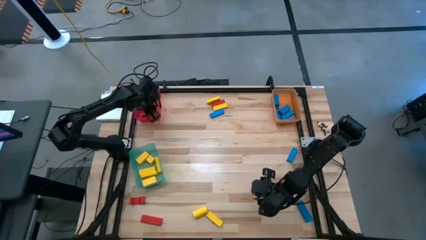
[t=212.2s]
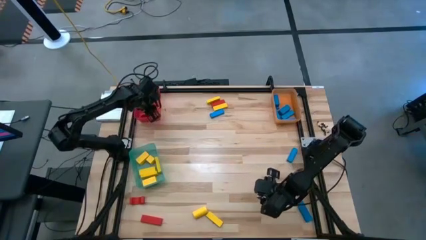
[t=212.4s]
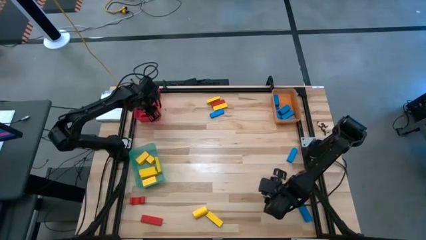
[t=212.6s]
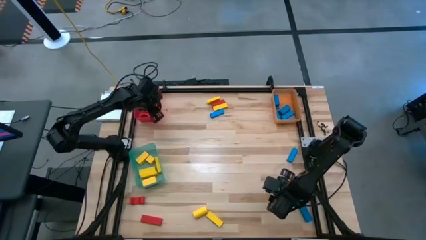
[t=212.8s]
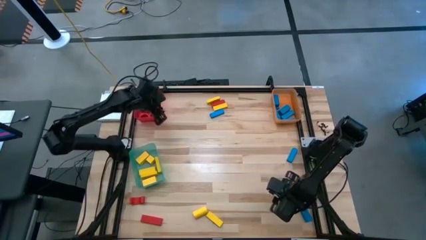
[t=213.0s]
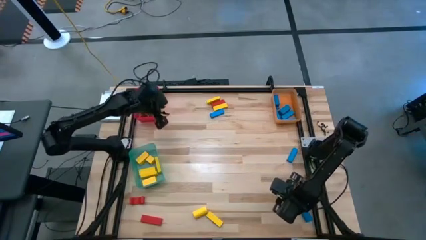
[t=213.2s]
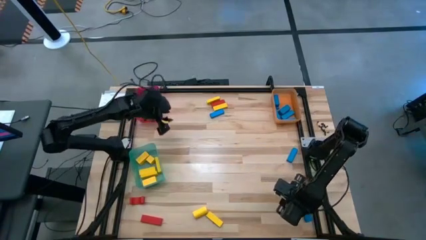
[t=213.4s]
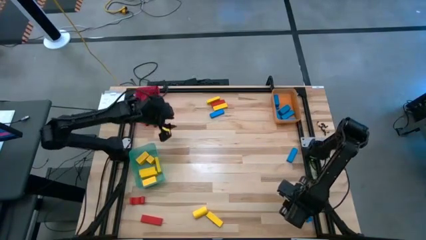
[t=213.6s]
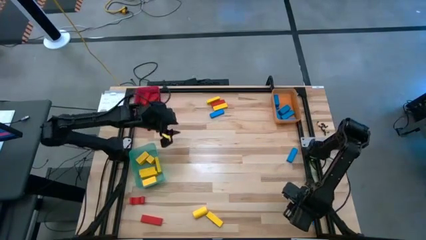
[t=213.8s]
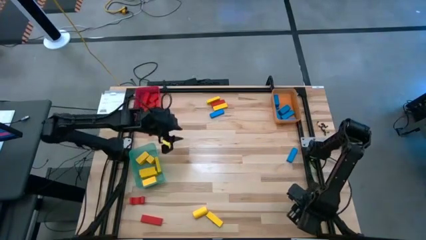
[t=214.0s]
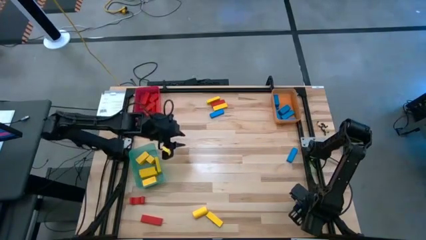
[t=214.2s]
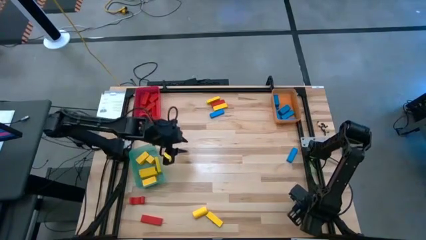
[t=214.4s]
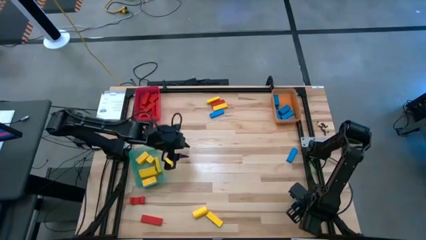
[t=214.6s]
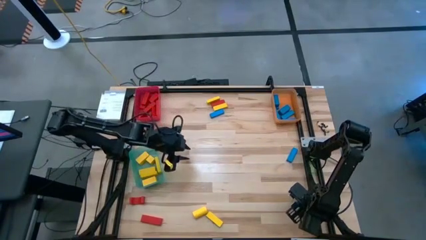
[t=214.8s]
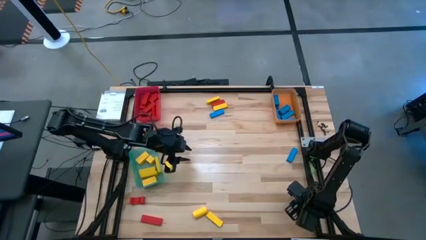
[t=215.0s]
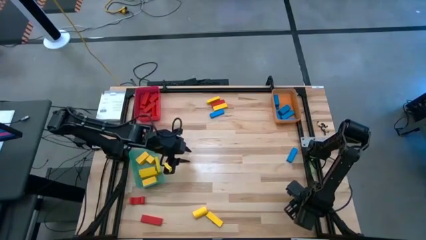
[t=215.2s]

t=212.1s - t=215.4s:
Task: Sort blocks
Put the blue block into the orange bin

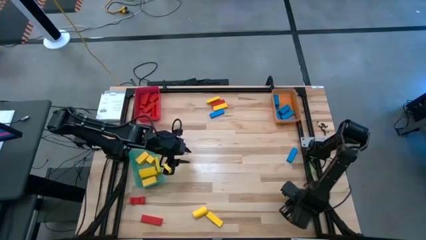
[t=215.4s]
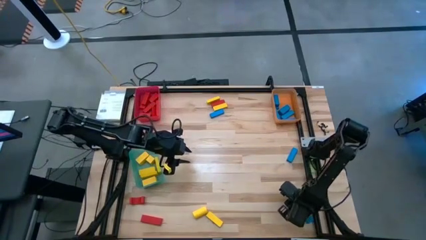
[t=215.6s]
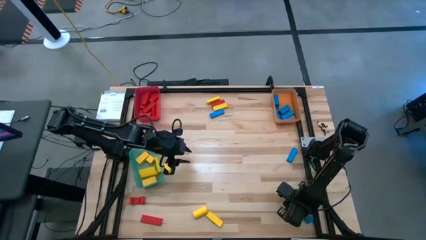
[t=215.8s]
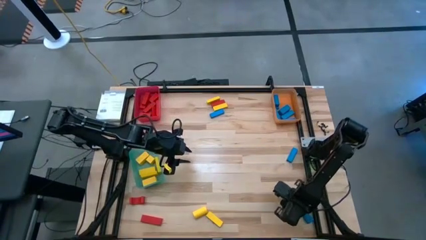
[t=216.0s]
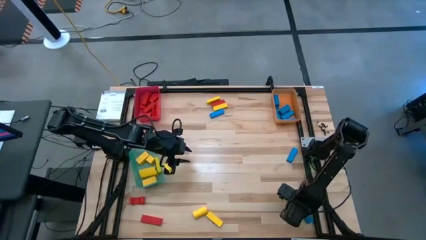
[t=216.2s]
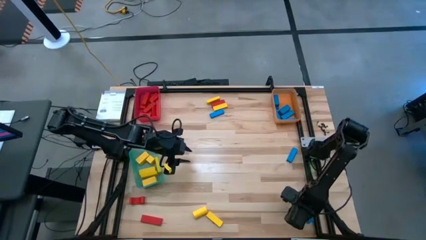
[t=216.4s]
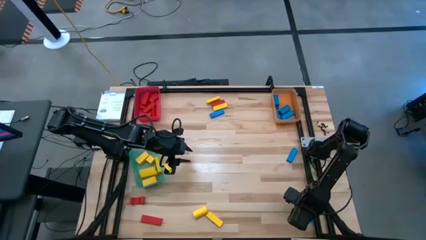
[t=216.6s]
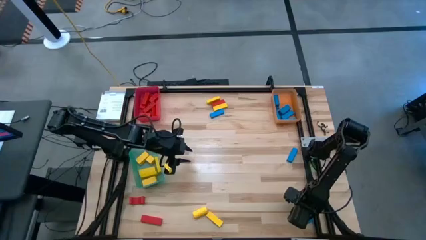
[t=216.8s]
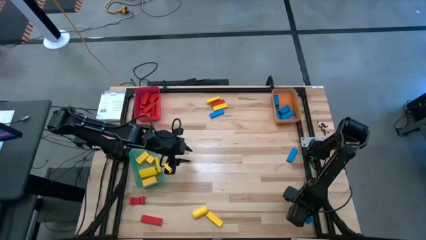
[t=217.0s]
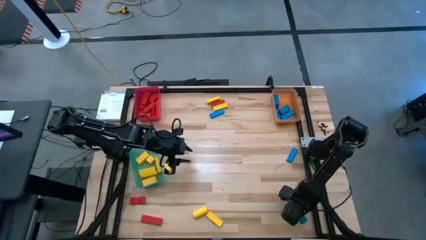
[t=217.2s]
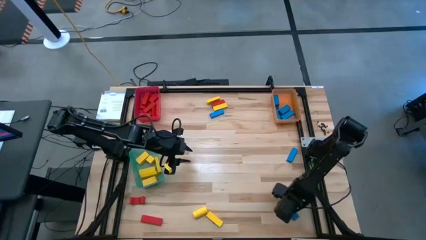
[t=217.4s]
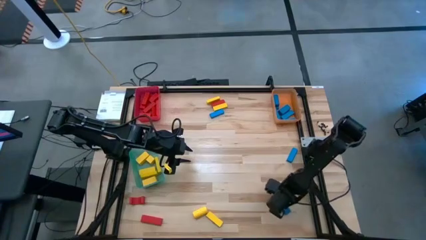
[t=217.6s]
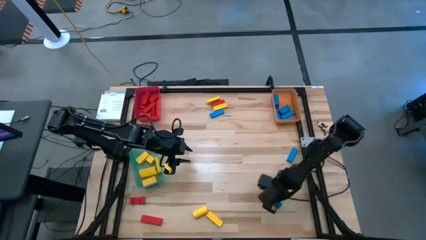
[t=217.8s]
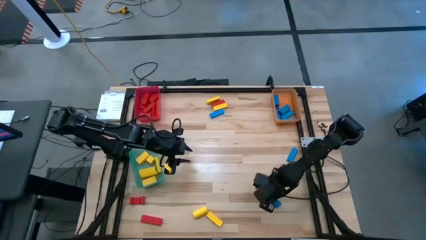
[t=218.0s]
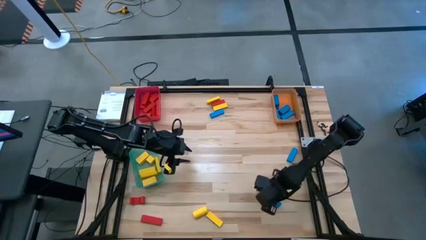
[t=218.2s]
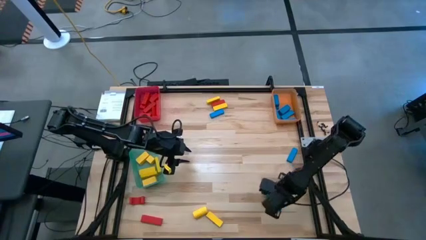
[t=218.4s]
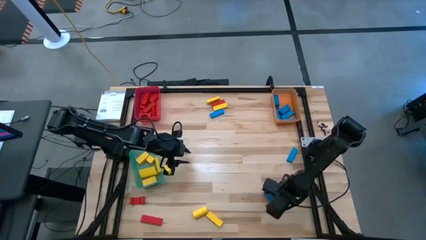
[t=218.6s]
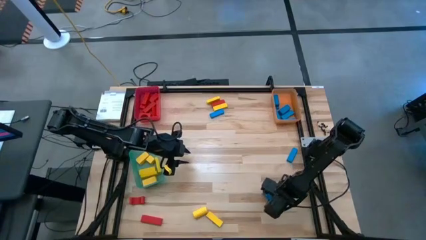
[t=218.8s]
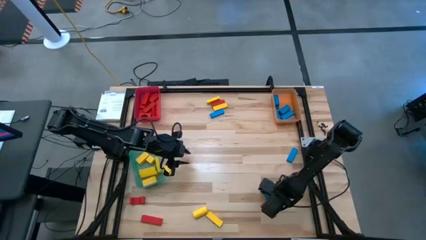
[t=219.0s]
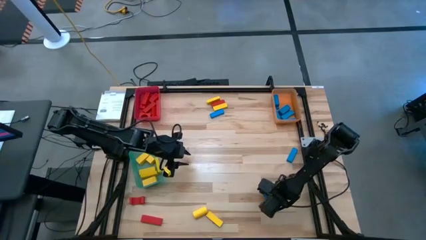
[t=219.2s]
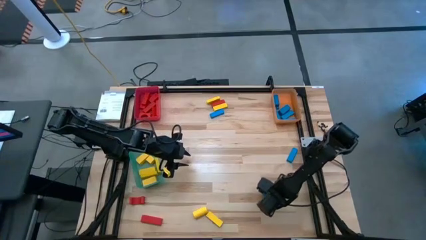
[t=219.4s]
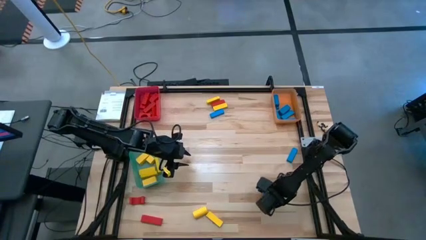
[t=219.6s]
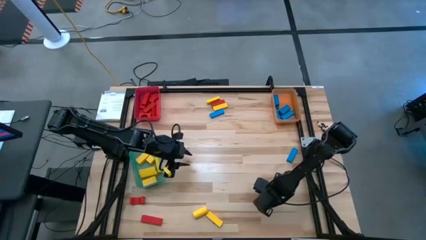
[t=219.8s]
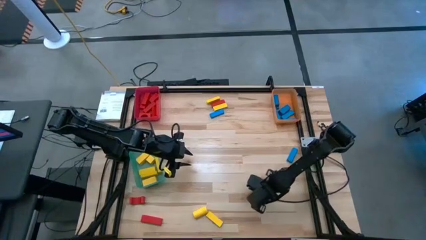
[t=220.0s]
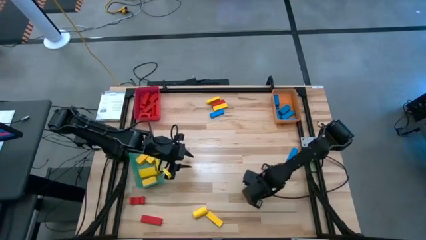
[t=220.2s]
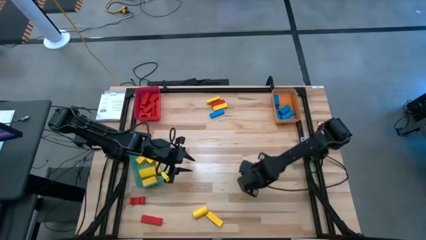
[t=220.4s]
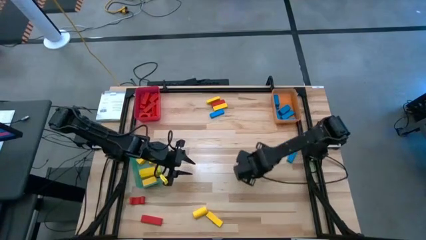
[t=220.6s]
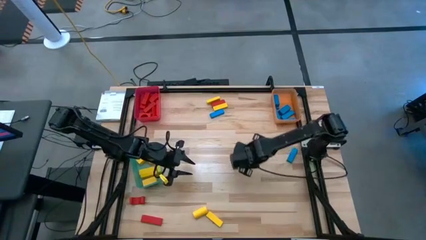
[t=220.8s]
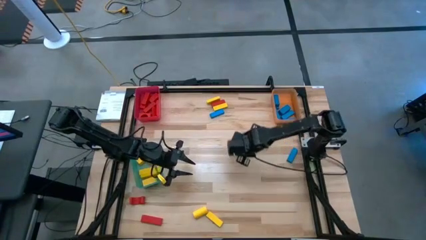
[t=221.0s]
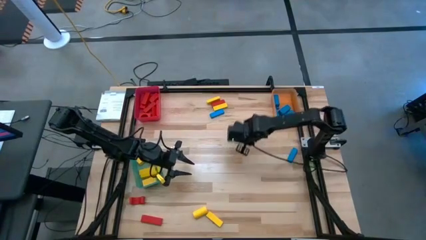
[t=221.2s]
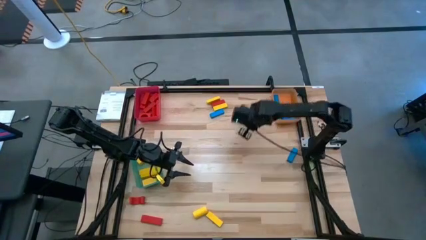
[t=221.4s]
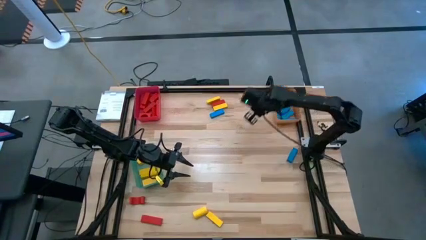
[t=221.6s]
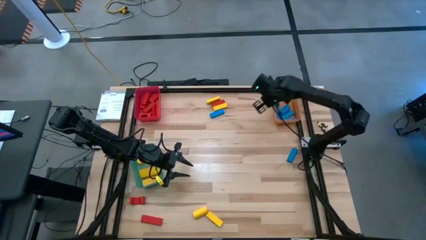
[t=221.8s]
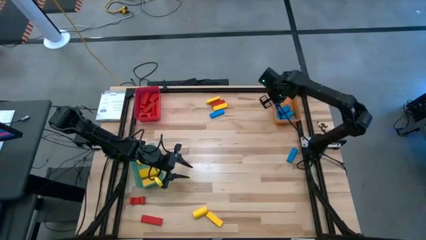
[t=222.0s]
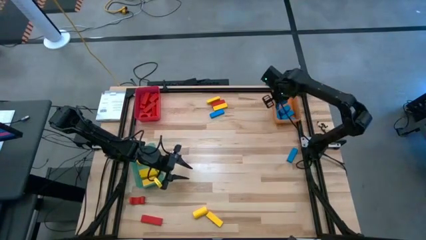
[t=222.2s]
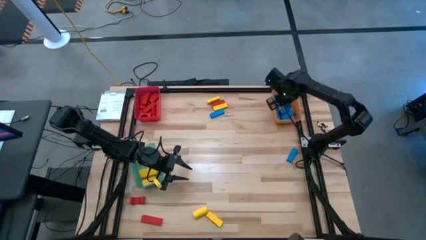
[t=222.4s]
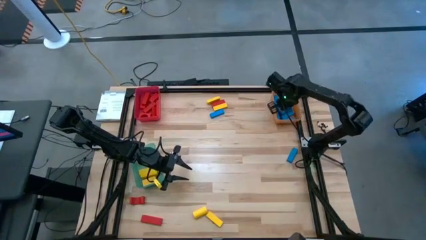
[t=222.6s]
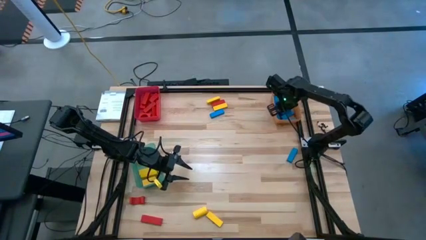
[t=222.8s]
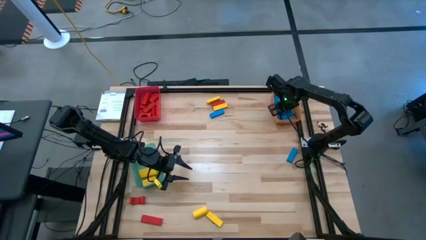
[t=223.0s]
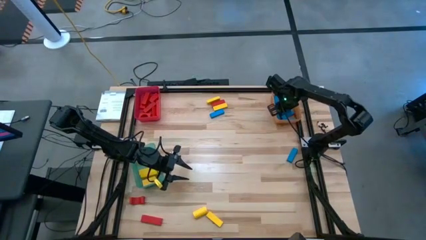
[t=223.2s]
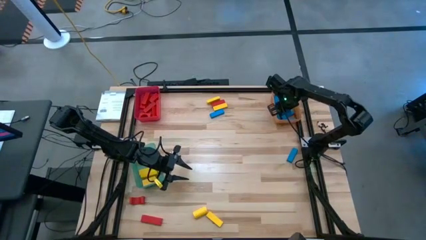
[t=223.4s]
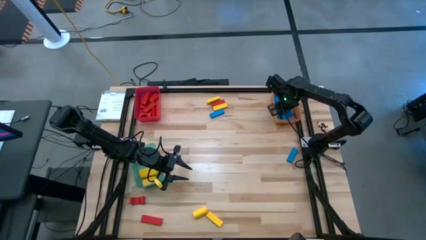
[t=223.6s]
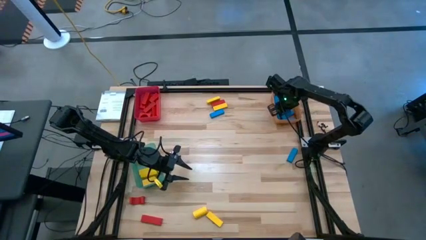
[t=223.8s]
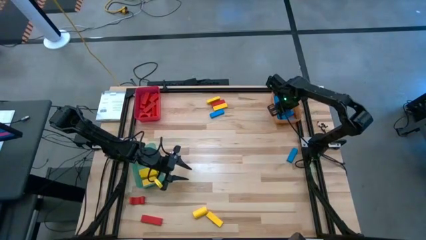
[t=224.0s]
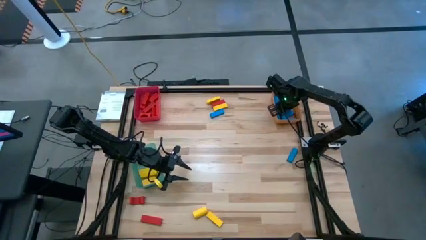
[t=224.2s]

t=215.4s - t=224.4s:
Put the blue block into the orange bin
